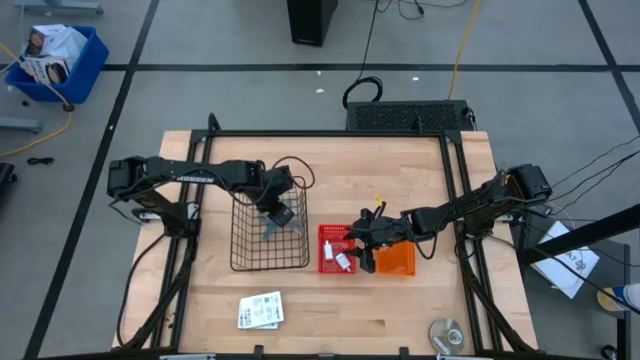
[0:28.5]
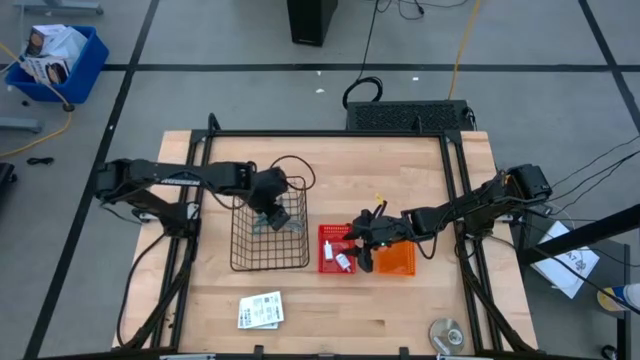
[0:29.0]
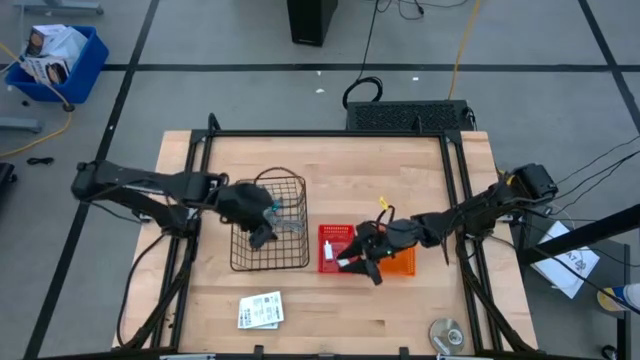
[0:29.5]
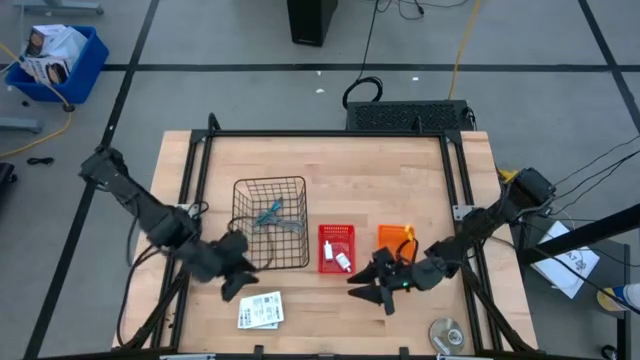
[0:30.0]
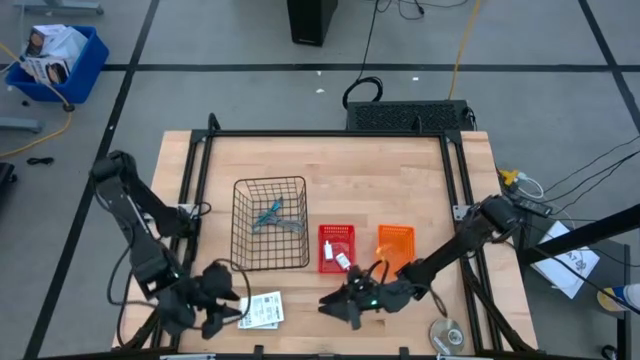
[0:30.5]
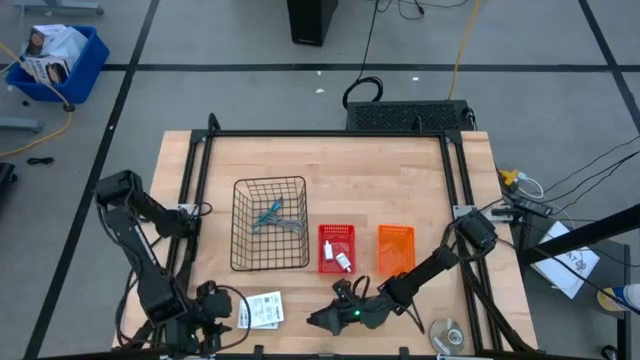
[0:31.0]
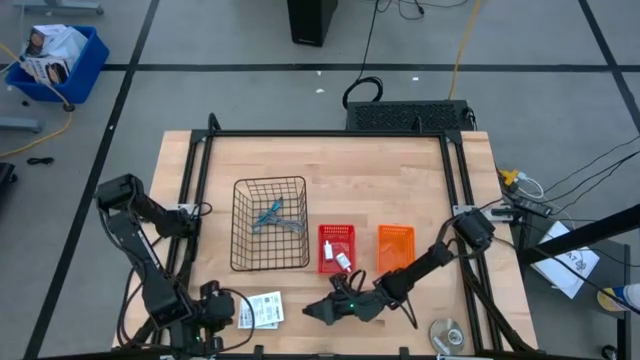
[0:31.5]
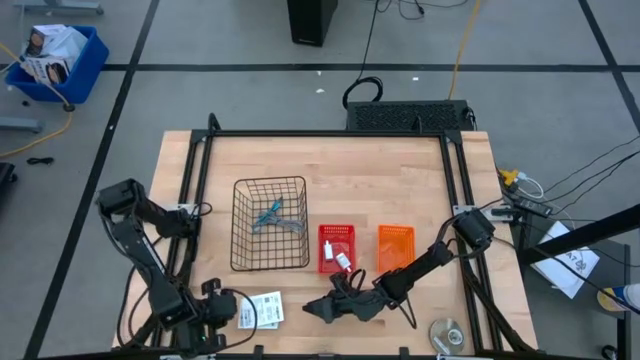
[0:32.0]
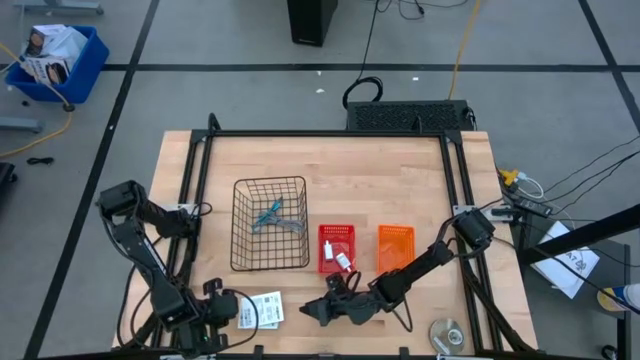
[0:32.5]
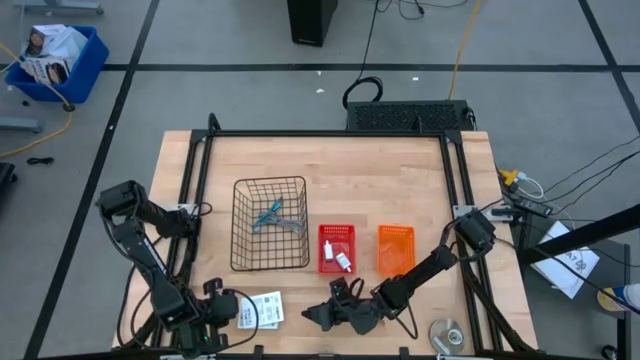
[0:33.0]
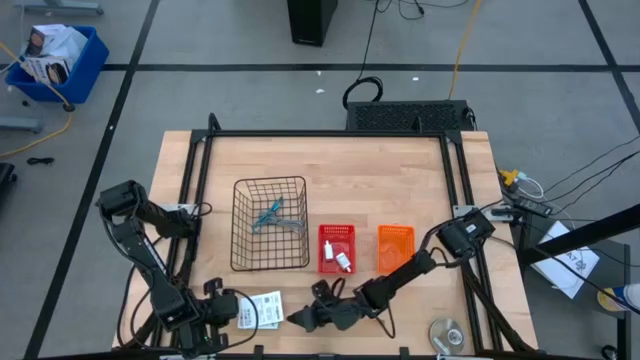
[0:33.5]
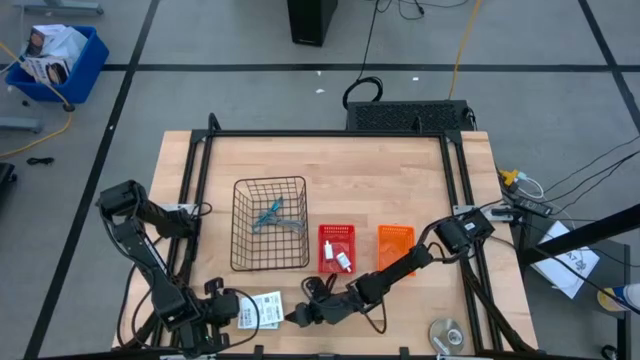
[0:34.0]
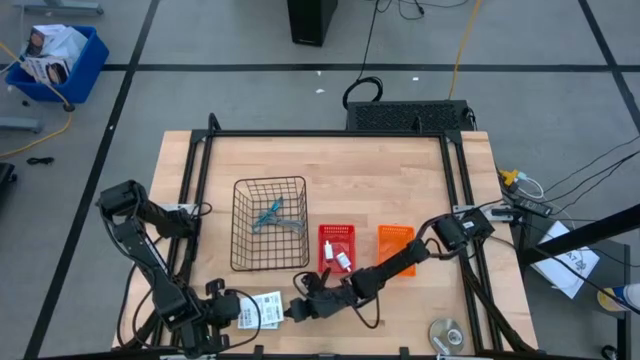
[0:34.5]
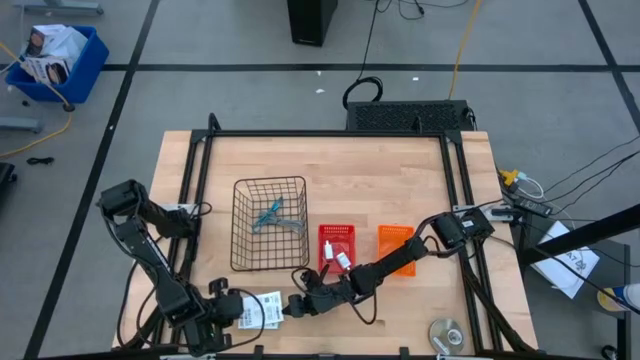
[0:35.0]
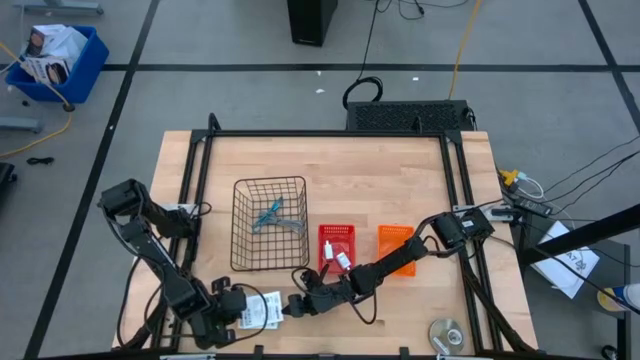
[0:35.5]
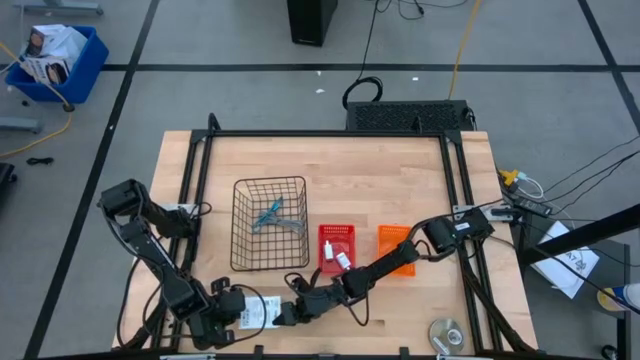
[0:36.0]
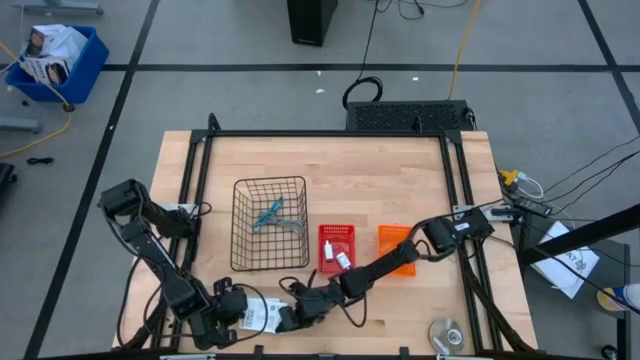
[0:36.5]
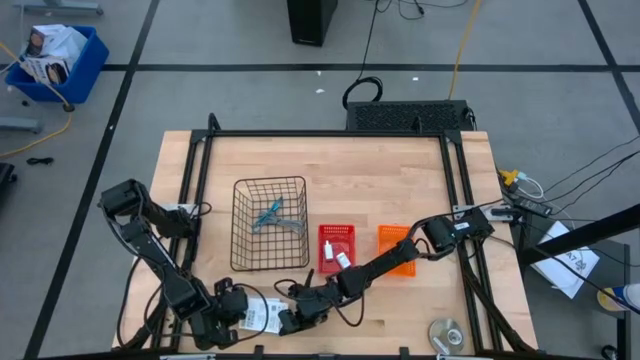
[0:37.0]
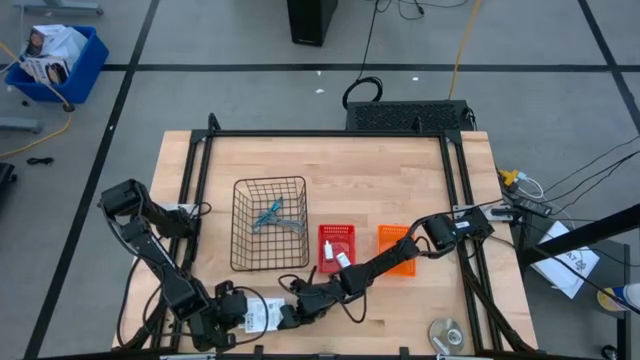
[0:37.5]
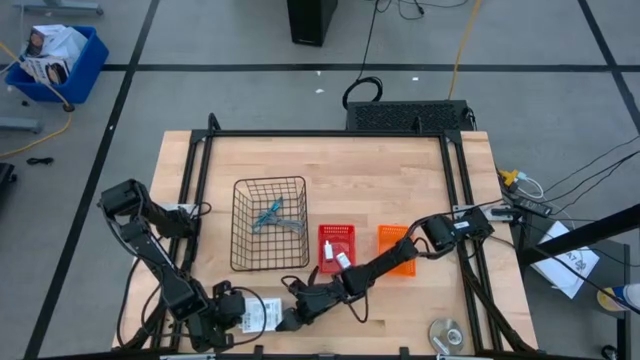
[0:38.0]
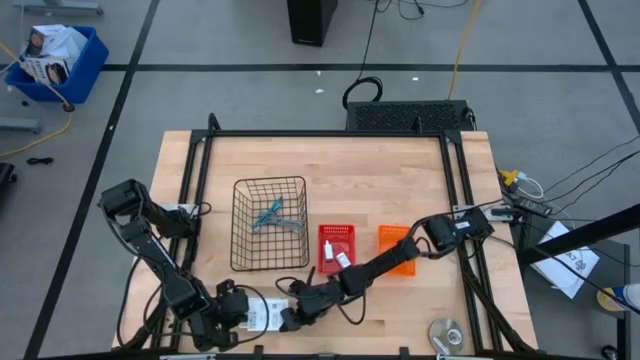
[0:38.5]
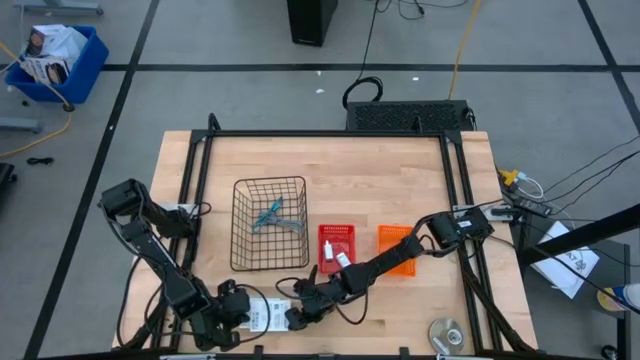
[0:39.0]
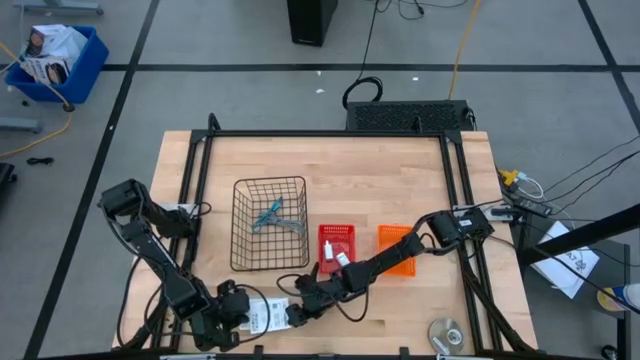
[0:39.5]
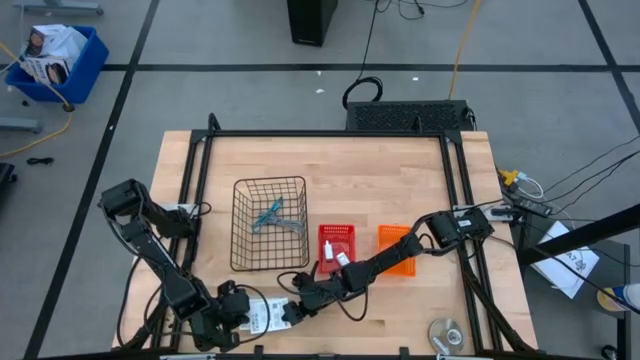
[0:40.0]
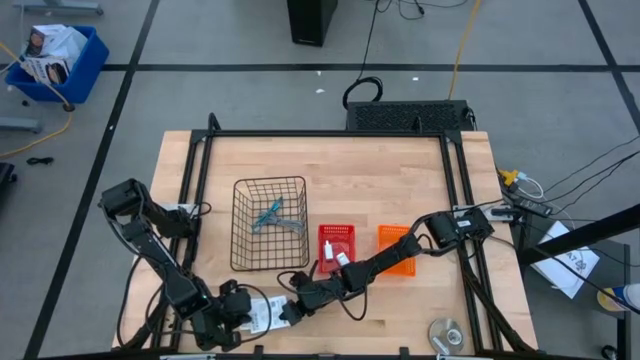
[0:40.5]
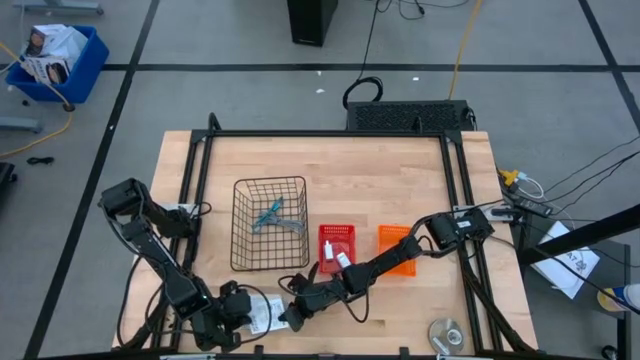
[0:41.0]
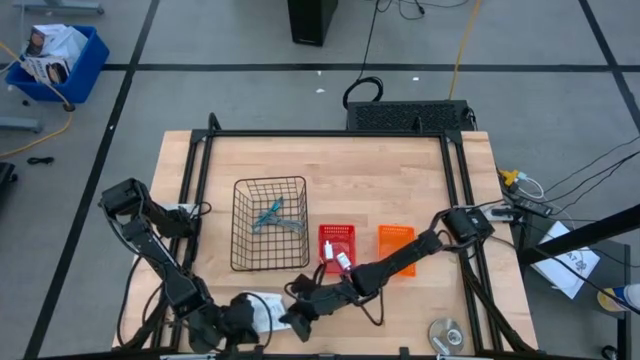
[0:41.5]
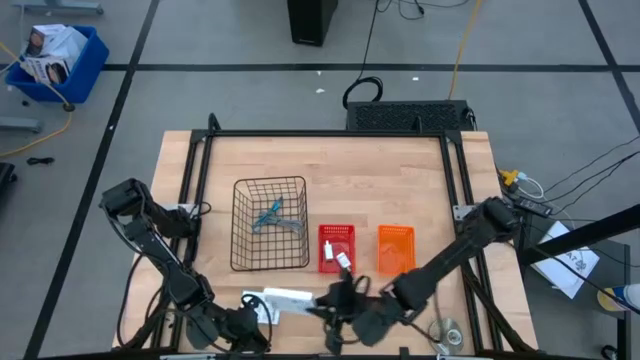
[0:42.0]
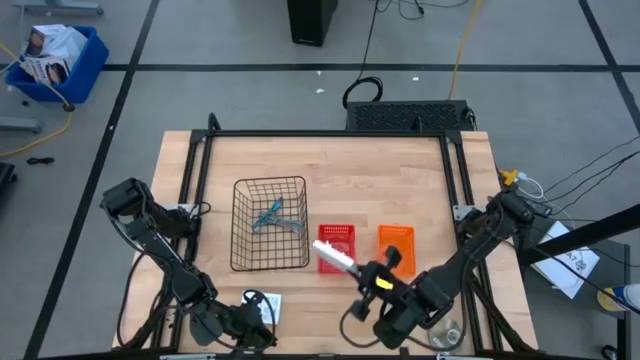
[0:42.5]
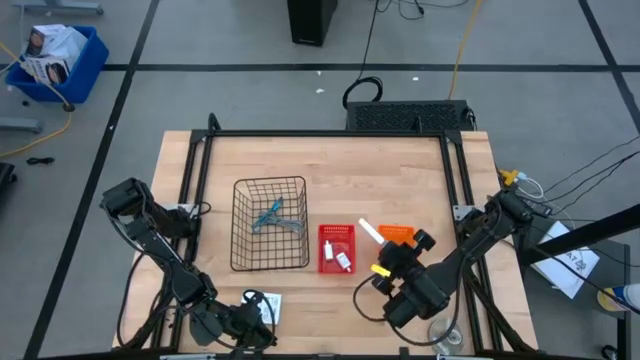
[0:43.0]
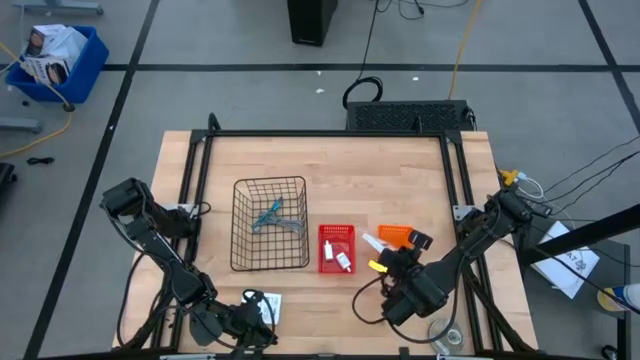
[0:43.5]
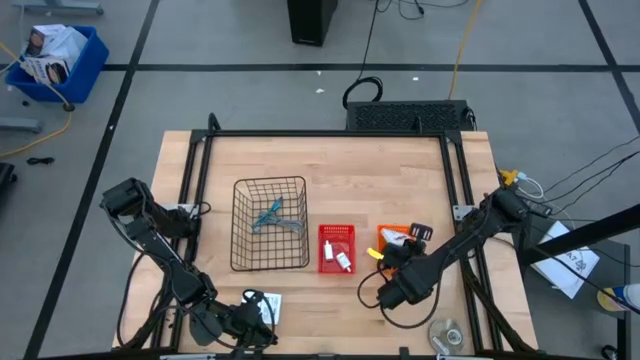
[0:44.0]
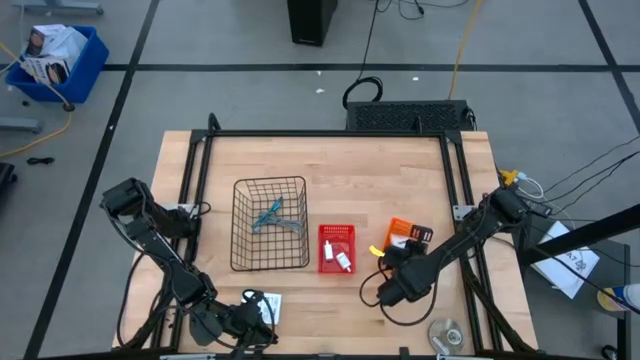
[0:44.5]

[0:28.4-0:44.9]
Task: Pick and place items into bin
Put the top white card reader box into the orange bin

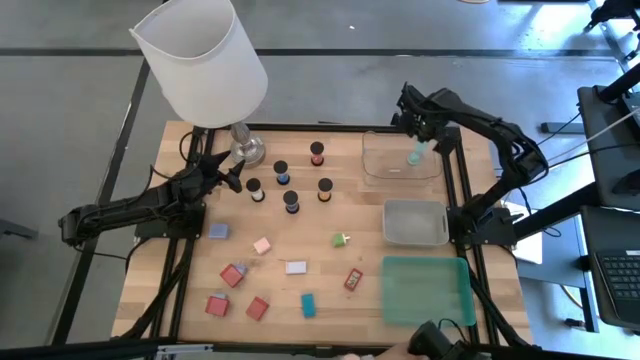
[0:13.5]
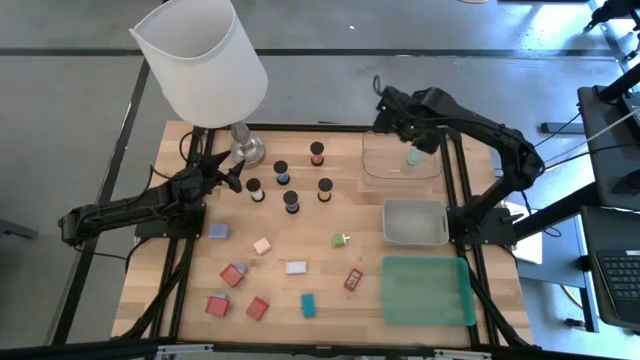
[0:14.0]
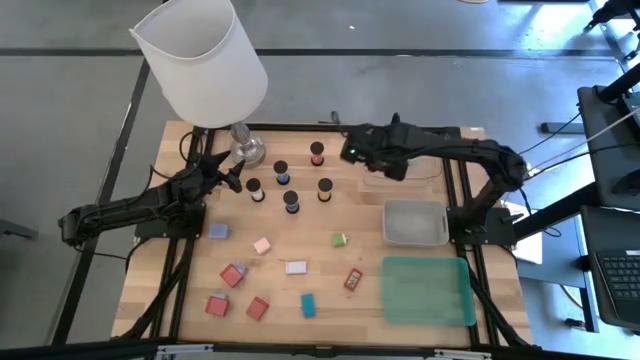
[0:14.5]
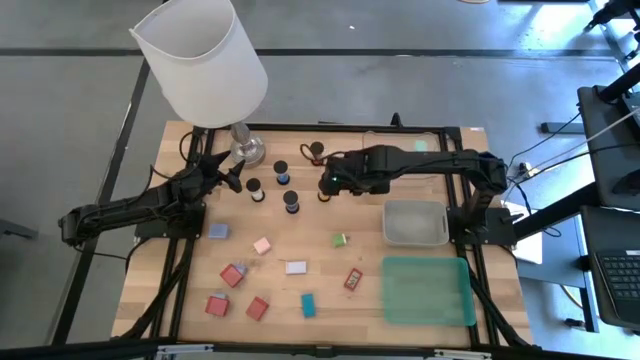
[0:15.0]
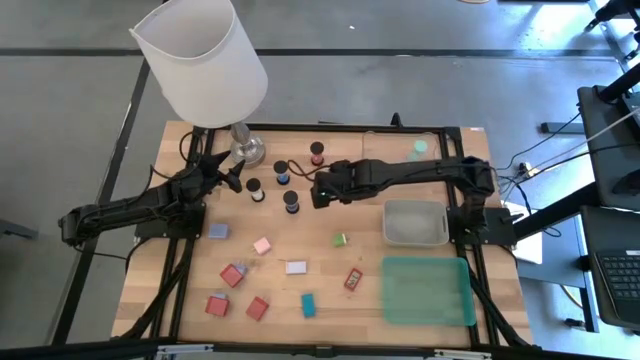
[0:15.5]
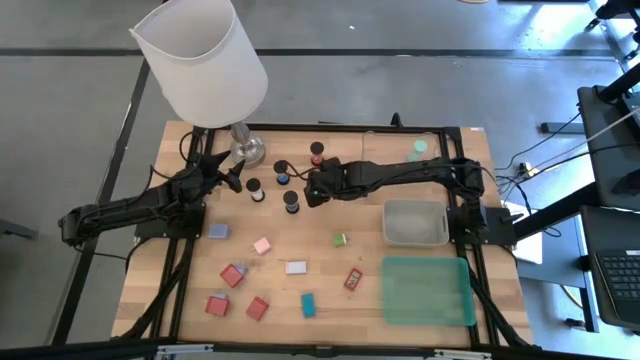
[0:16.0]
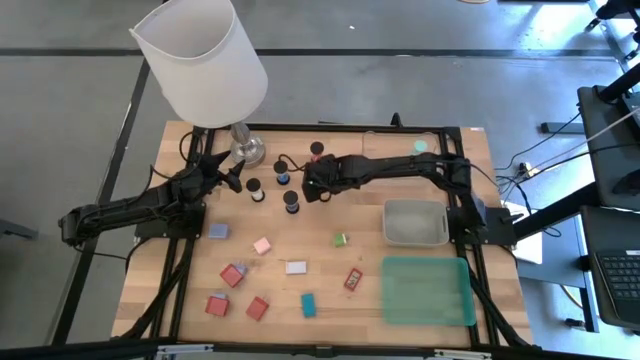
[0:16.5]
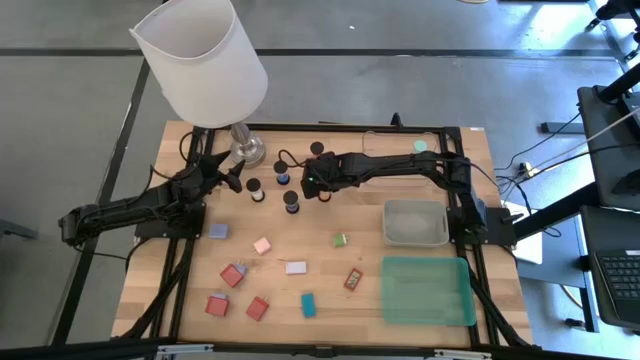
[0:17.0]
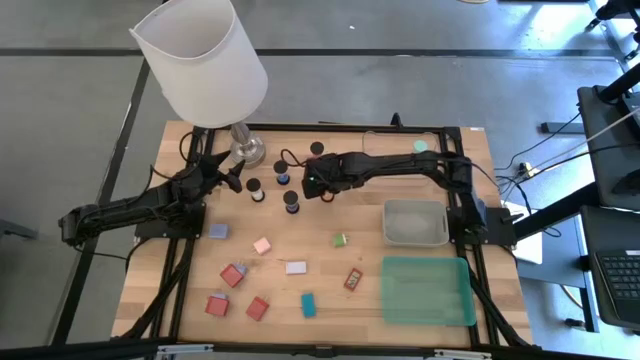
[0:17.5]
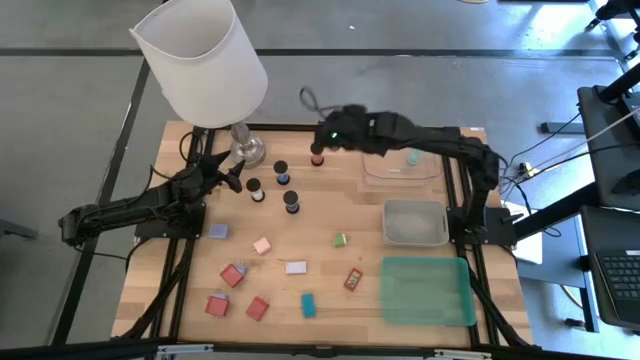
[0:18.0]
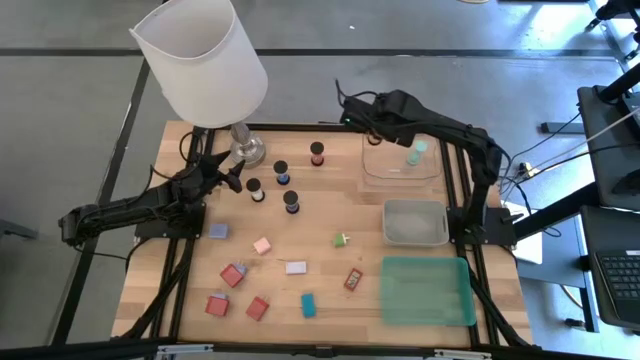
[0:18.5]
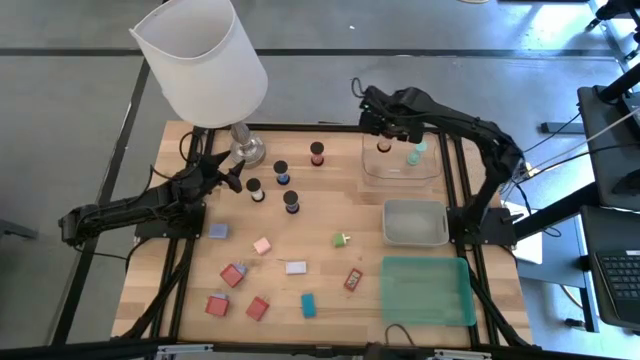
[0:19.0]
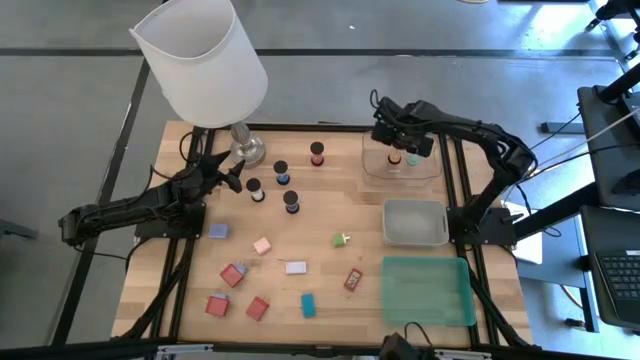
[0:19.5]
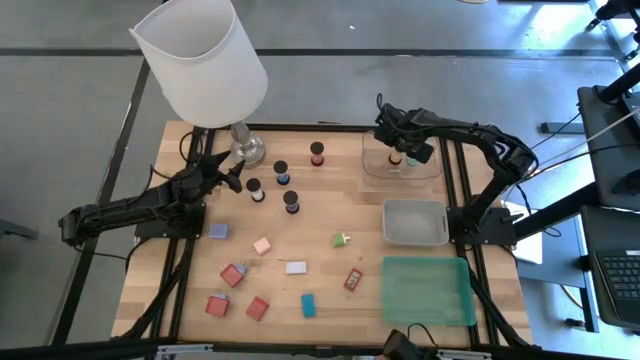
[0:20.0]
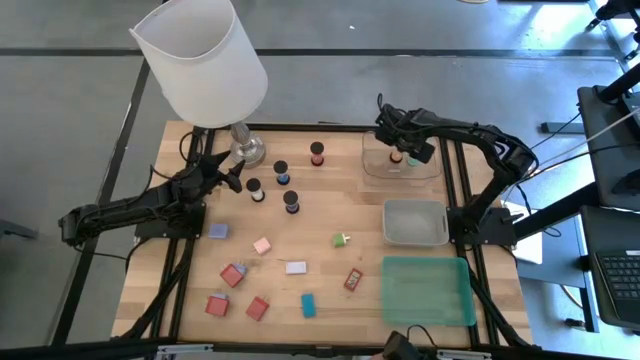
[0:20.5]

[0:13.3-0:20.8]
Task: Pick & Place Office items
Put the yellow hourglass into the transparent bin
